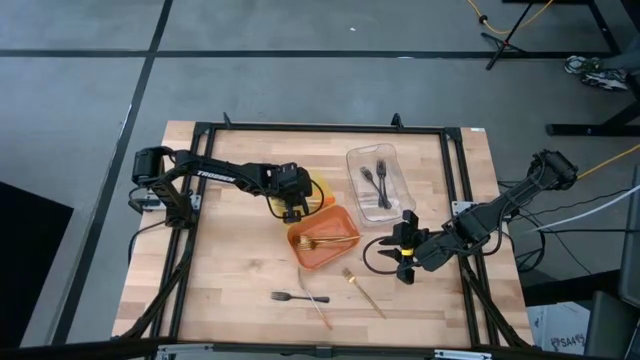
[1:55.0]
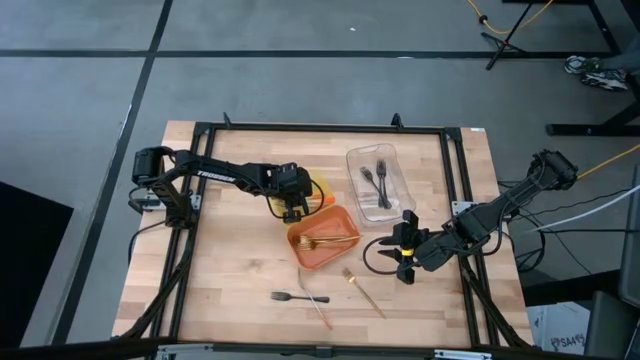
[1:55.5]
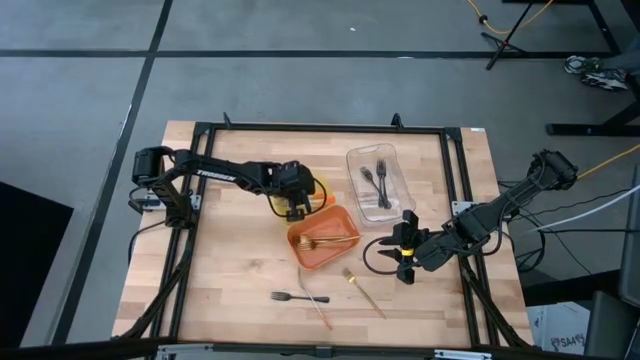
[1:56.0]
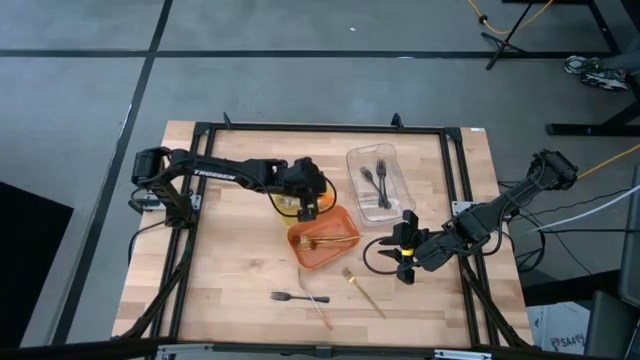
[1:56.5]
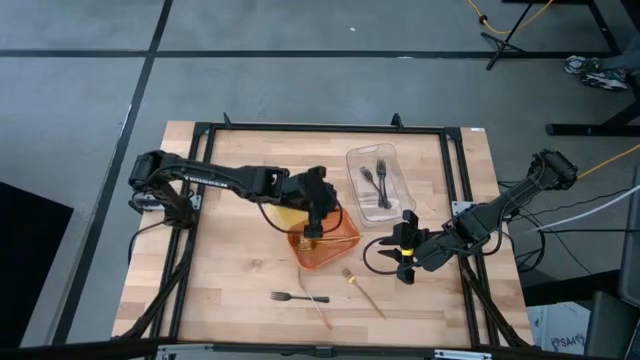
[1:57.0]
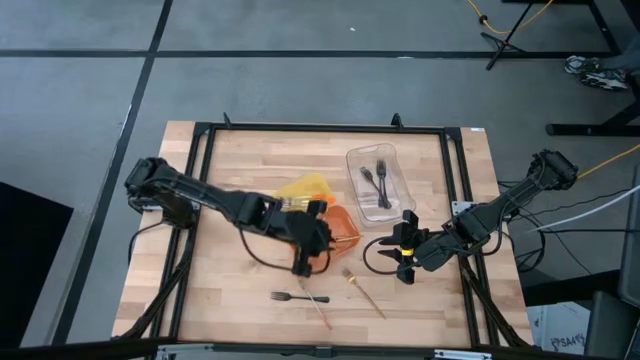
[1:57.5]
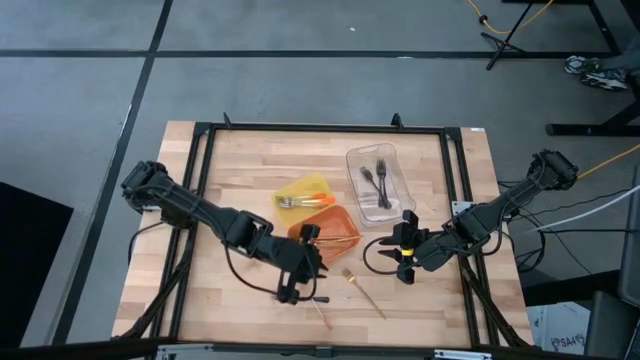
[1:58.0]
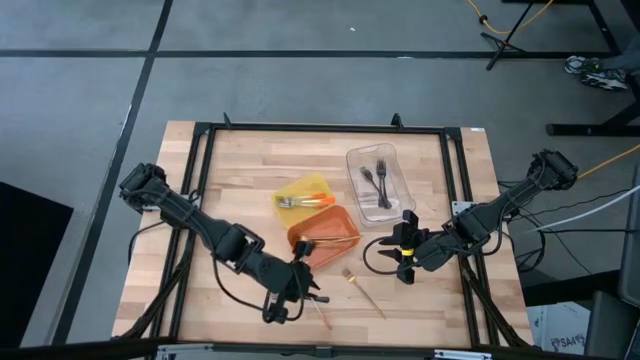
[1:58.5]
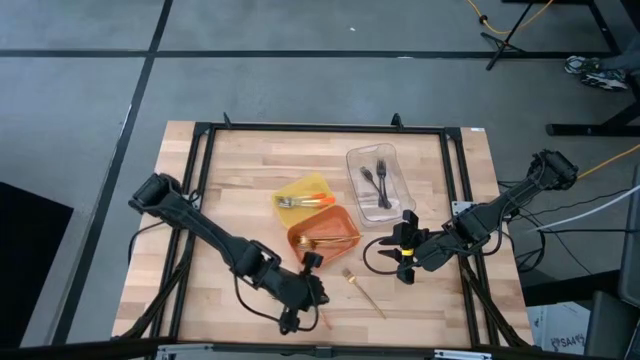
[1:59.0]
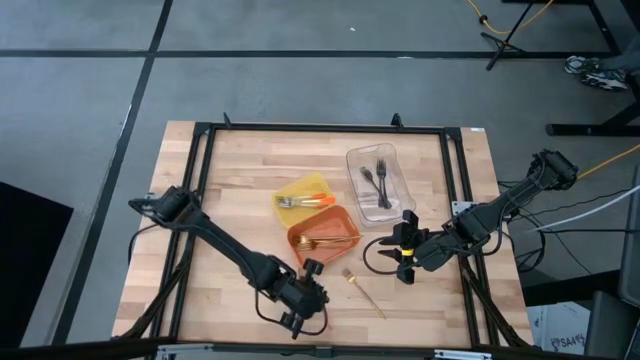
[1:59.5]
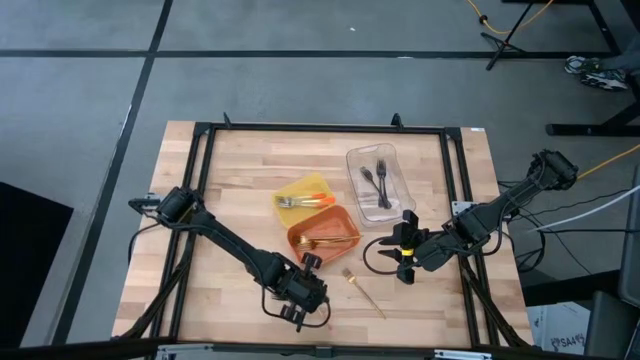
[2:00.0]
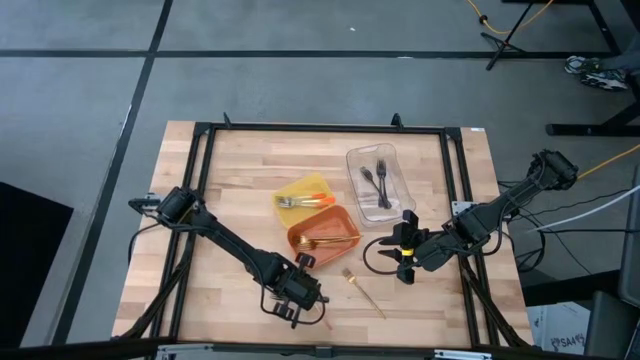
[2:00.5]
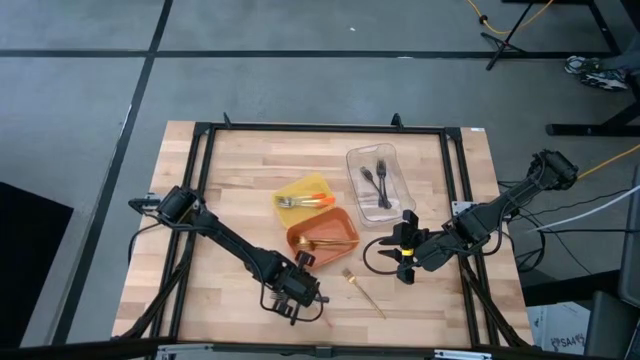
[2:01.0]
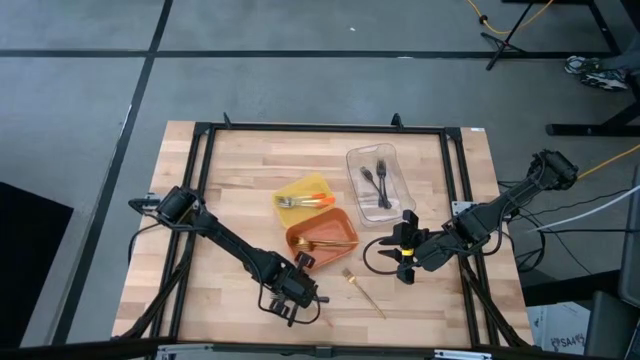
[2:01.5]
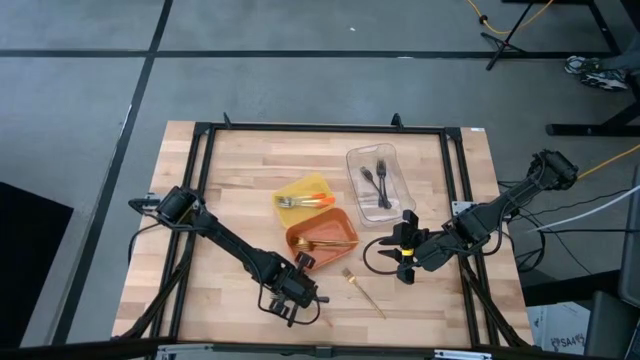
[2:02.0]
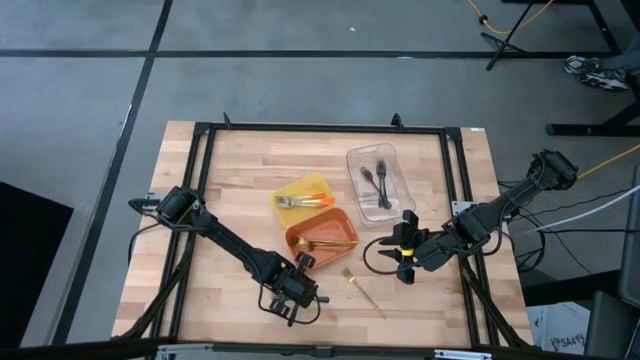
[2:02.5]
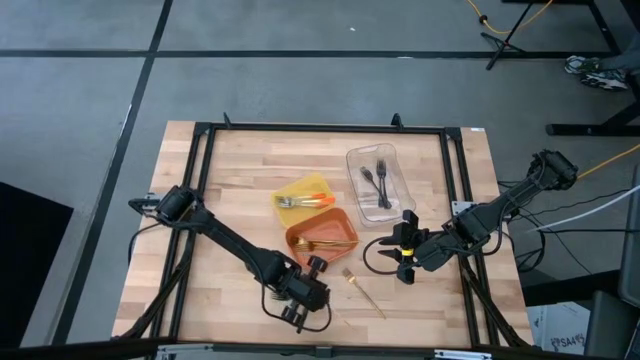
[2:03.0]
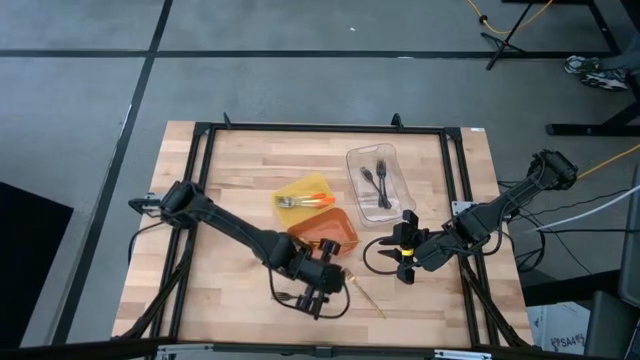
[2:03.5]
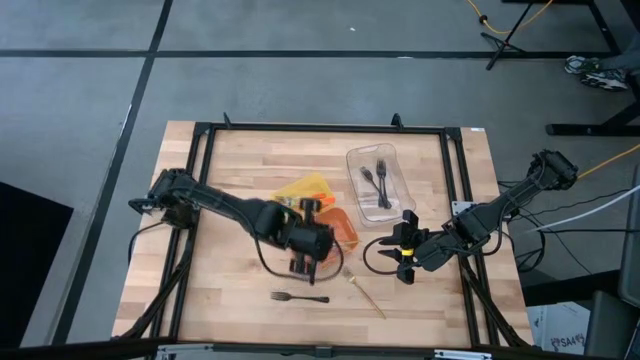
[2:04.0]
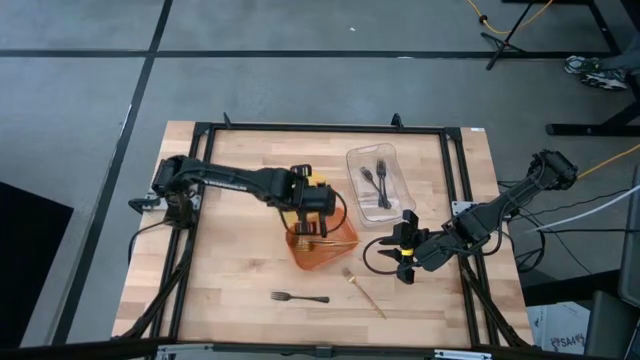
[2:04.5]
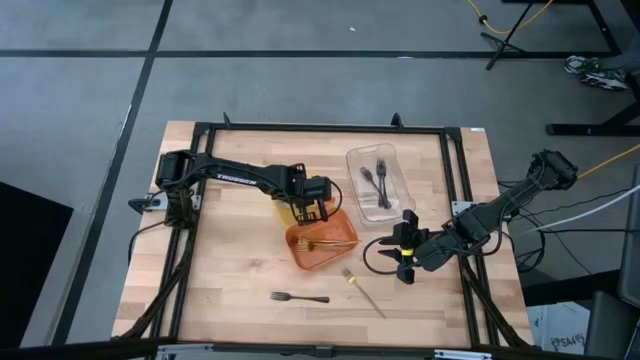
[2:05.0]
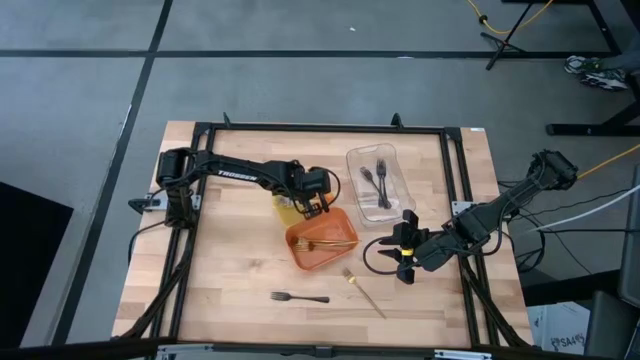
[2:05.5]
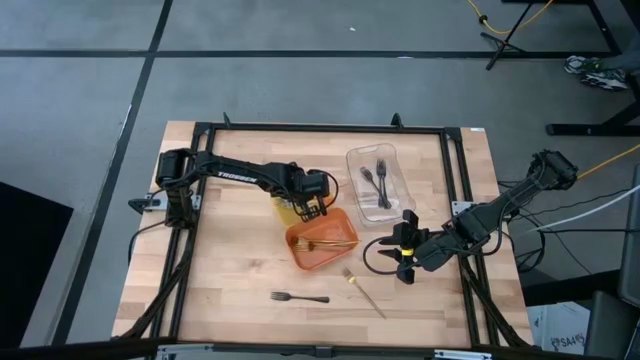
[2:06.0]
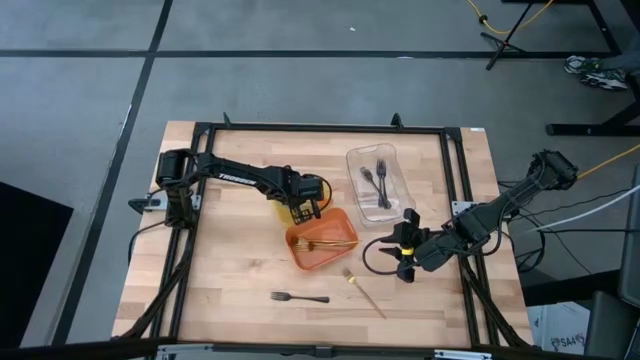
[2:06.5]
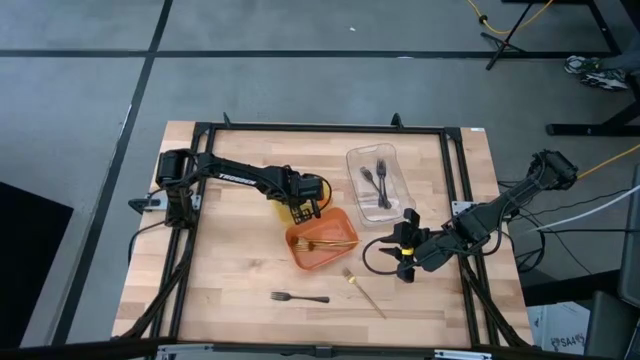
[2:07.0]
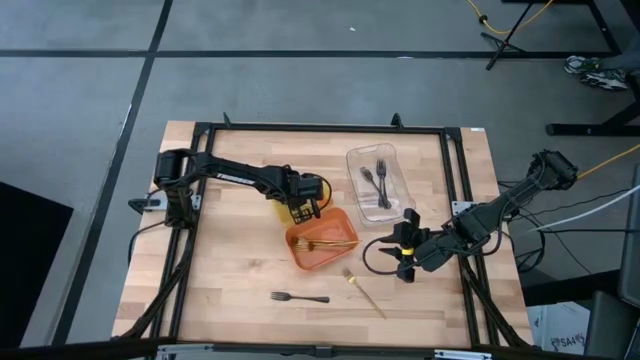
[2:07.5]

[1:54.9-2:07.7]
Task: Sort silverware by color (type)
Put the orange fork into the yellow bin

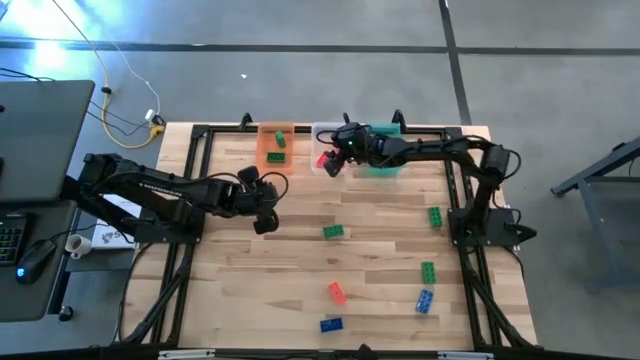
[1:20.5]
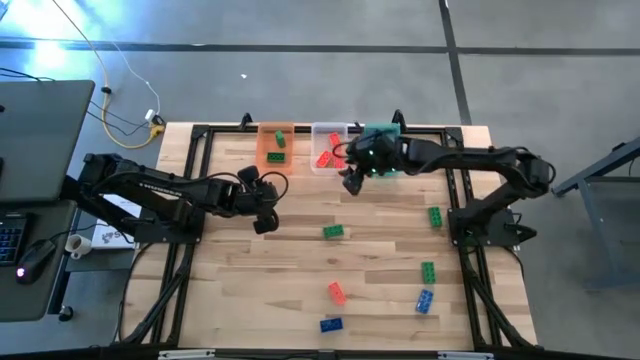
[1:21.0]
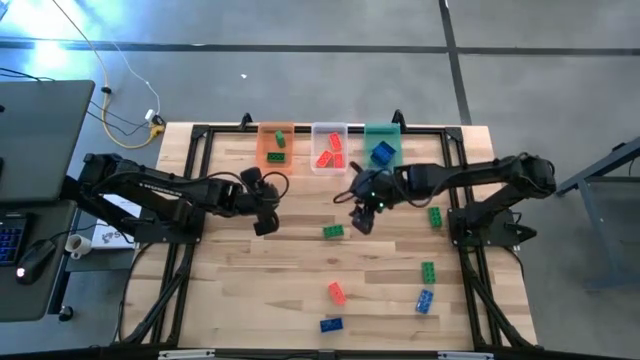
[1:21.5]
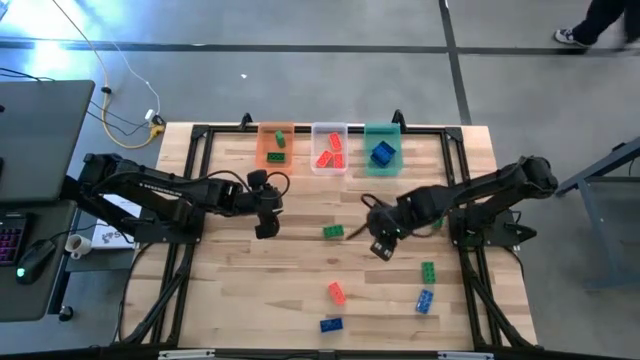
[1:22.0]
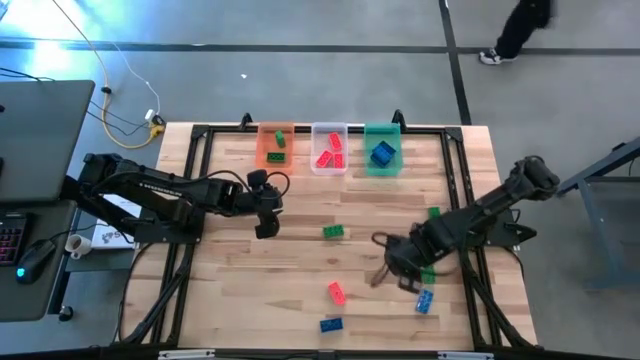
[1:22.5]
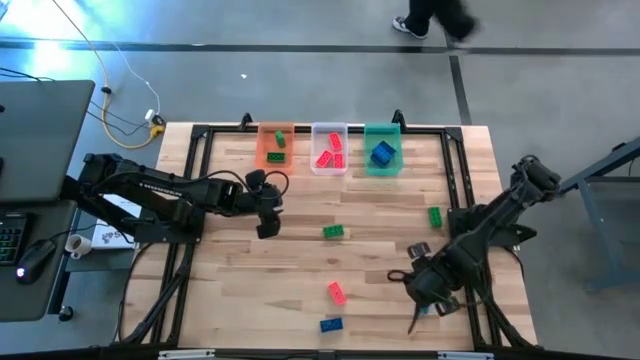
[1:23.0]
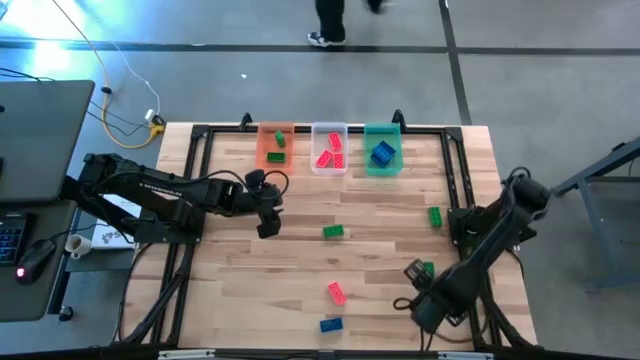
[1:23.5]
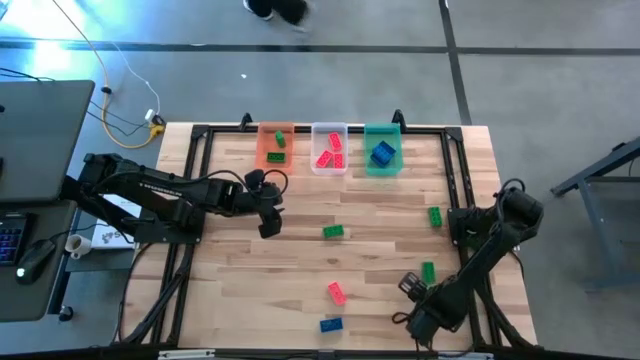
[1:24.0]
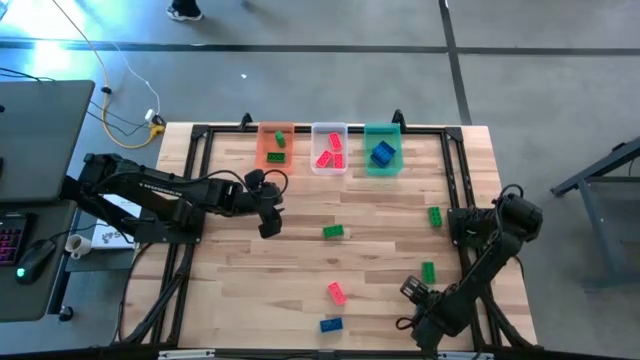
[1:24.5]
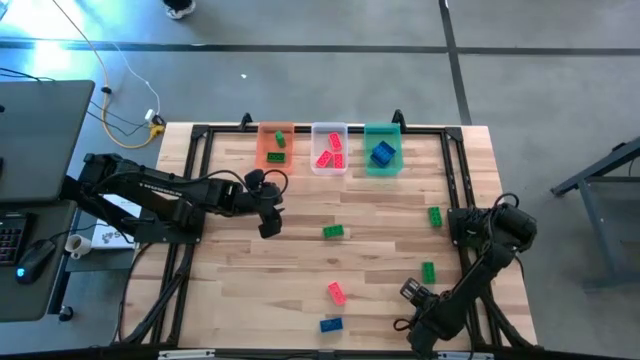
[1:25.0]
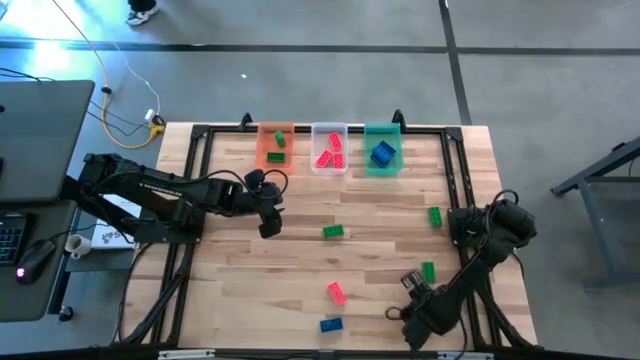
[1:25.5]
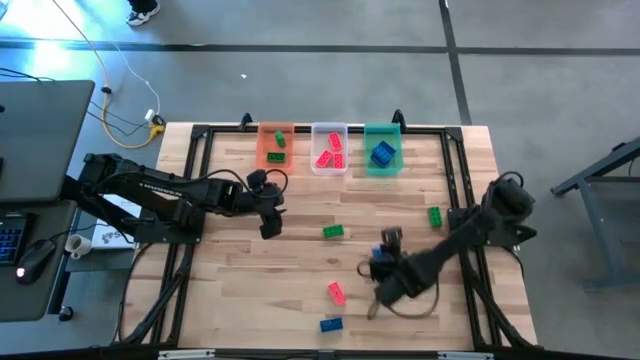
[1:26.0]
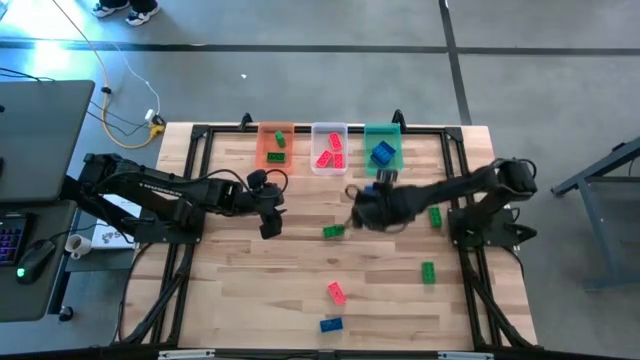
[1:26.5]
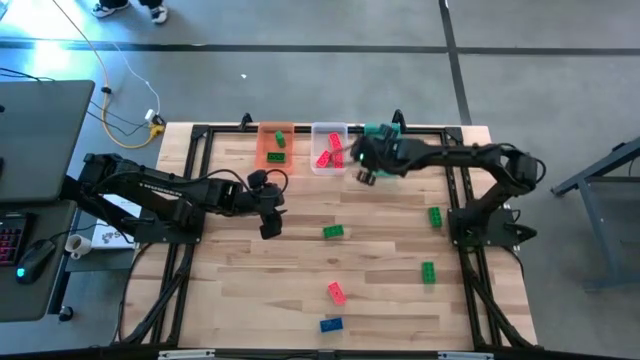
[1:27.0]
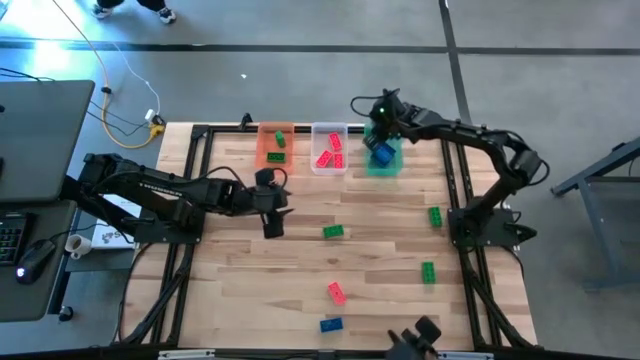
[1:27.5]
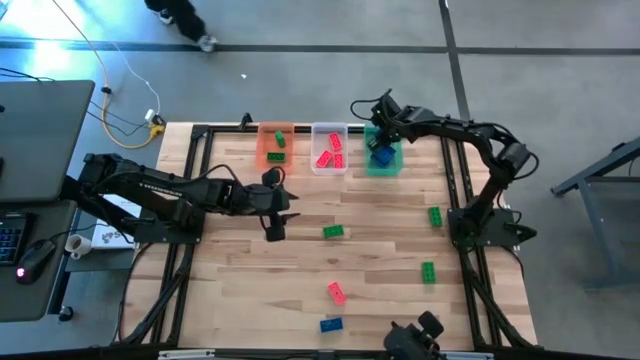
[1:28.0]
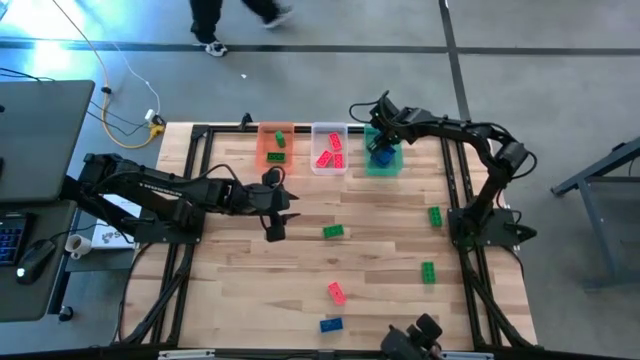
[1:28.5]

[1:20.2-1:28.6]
Task: Sort & place blocks by color
Put the blue game piece into the green bin
